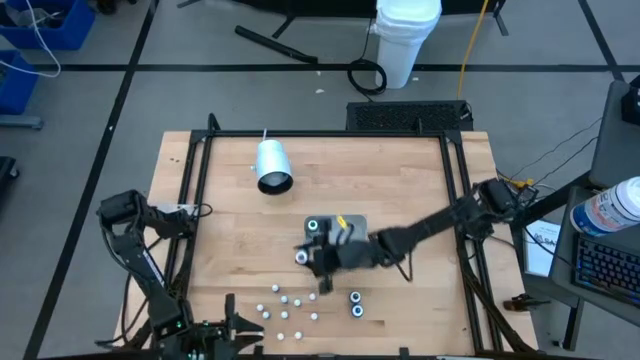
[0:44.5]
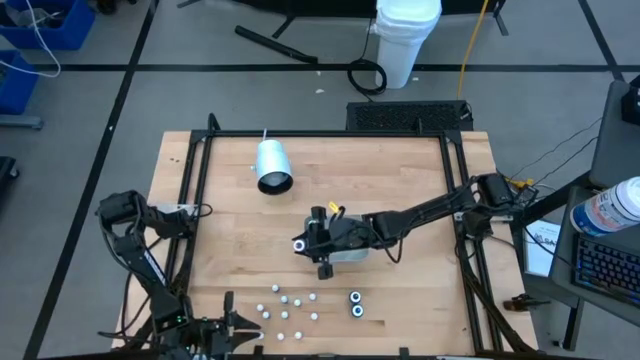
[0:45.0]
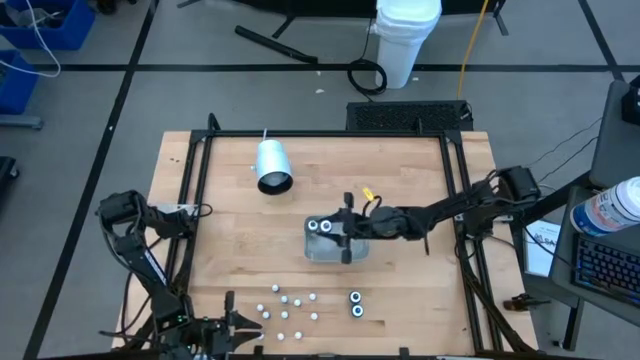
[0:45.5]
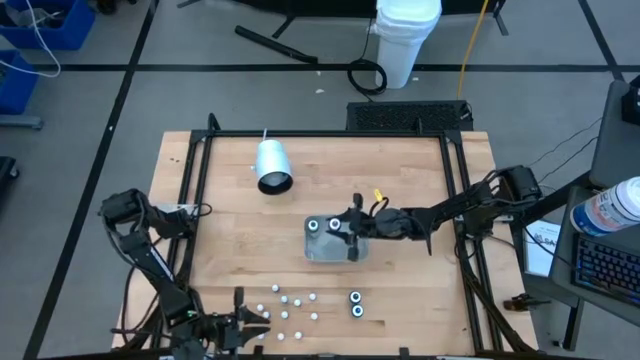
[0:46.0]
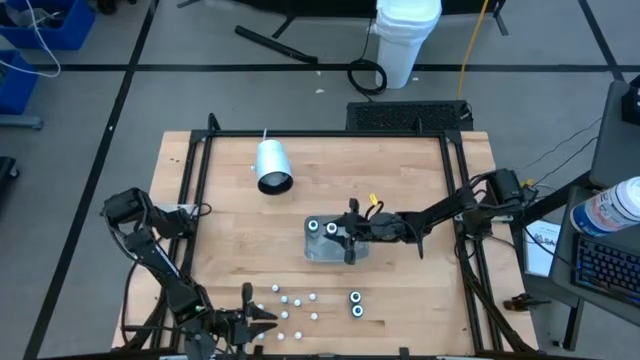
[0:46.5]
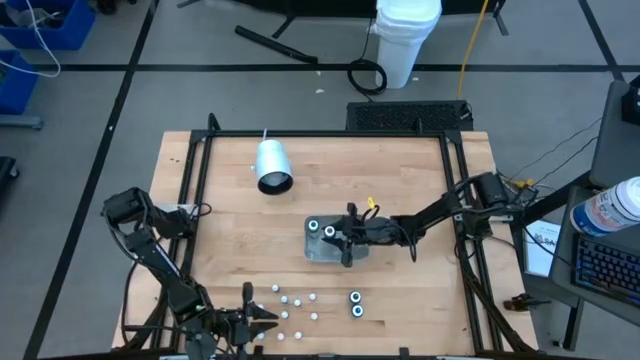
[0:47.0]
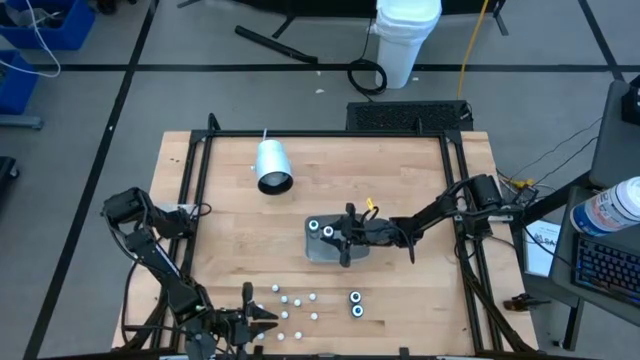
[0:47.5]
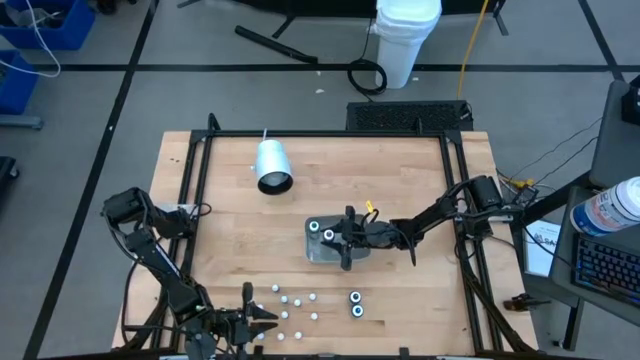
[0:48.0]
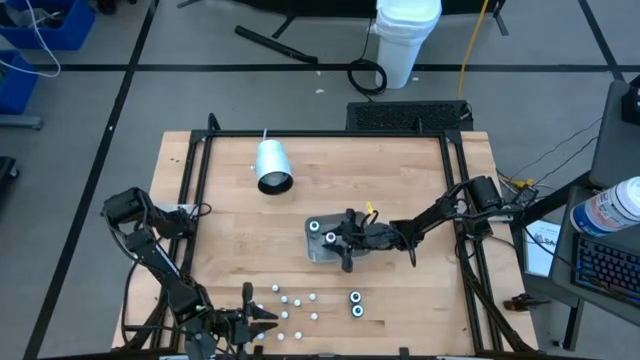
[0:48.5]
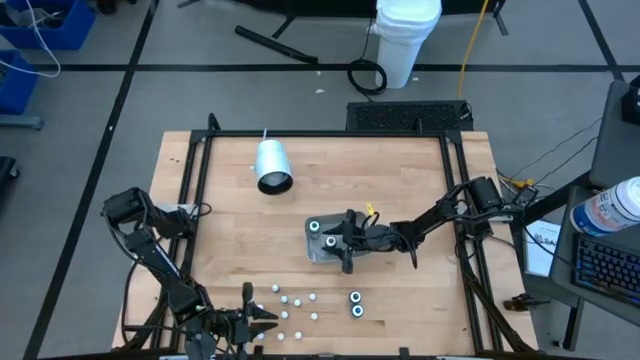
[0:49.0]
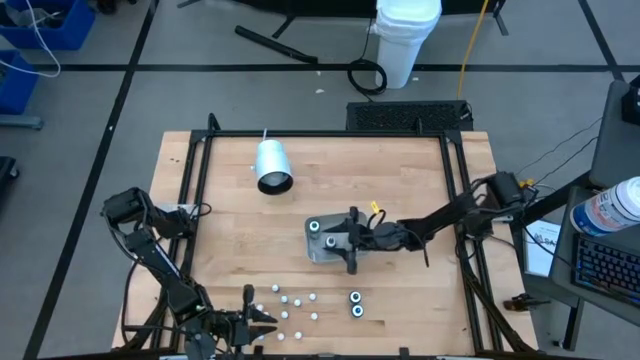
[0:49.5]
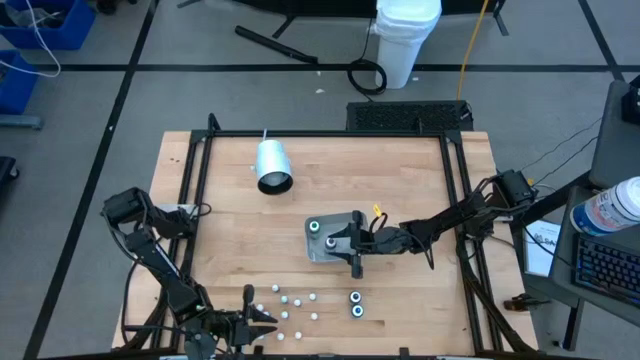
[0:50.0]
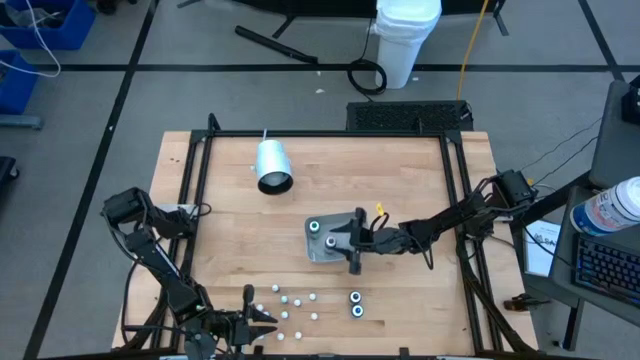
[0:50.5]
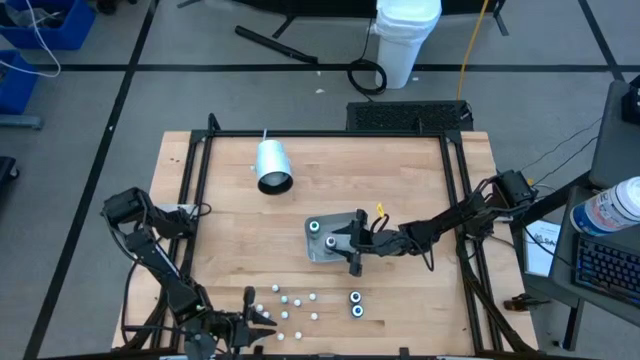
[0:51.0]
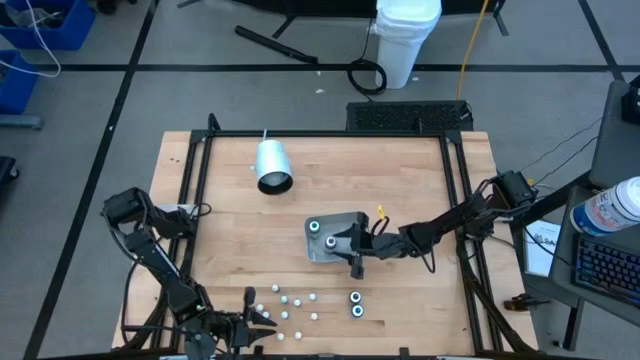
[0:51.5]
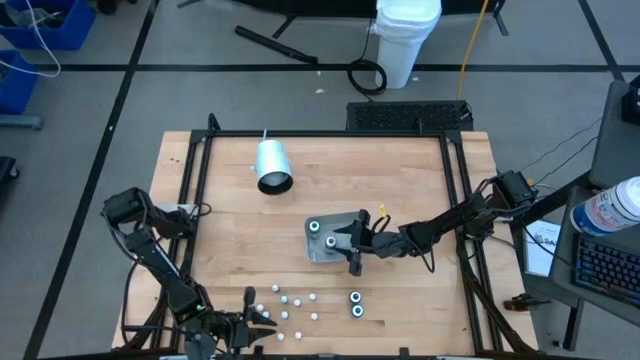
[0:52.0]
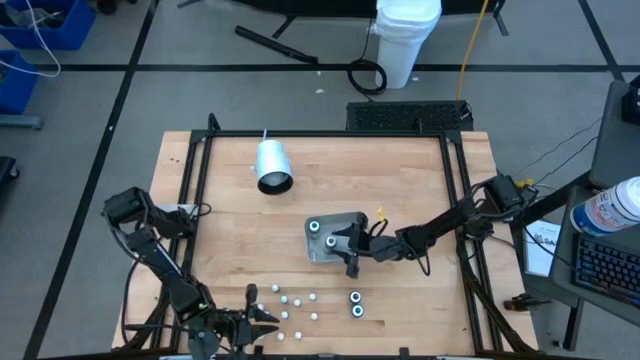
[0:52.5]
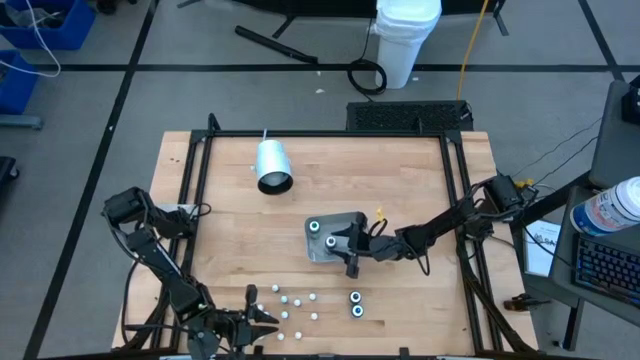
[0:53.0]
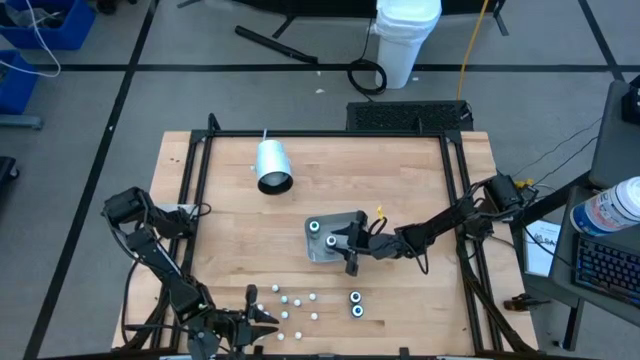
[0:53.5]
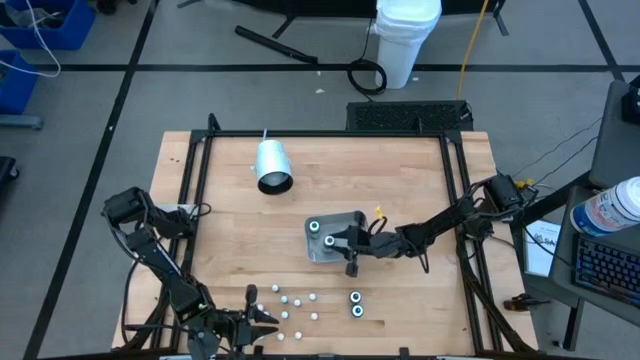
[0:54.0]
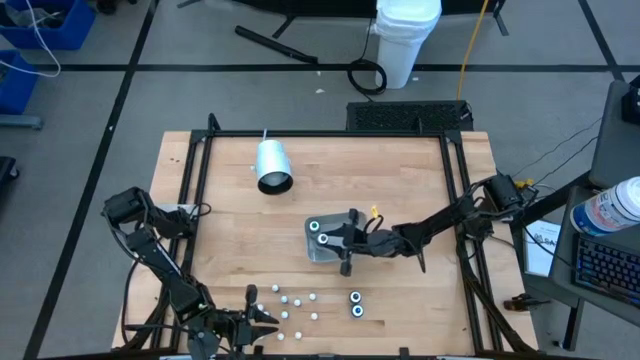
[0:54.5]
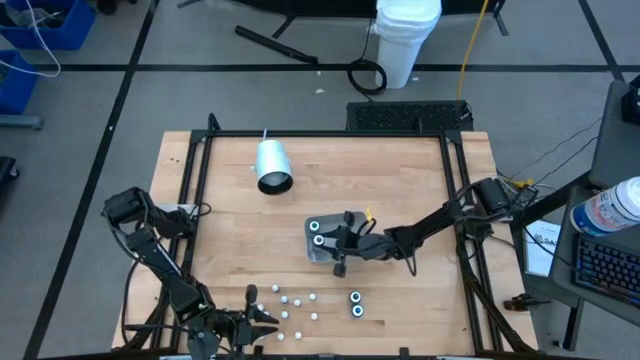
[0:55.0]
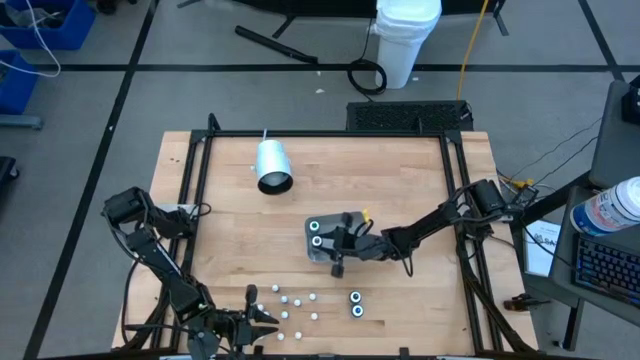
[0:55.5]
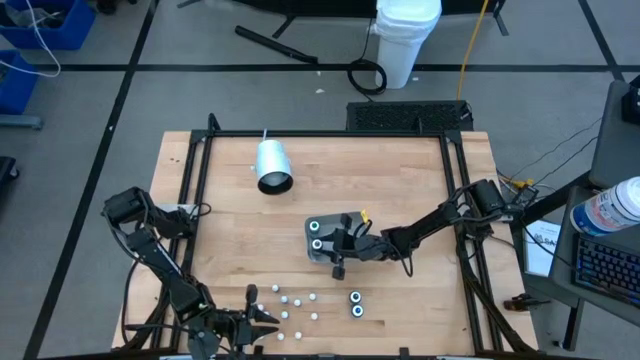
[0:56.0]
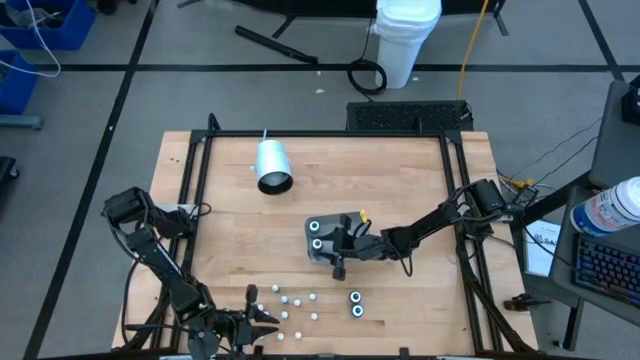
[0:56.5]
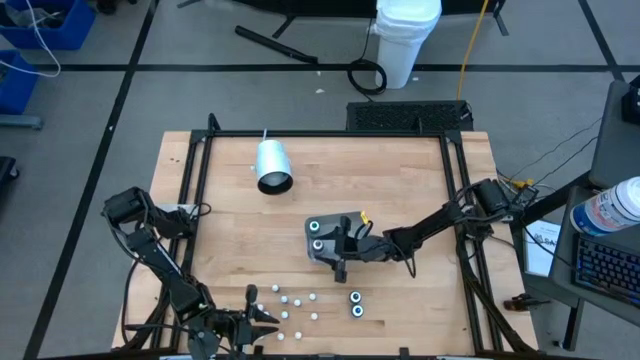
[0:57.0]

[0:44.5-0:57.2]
Task: Pick & Place food coloring
Put the large violet food coloring bottle into the white bin

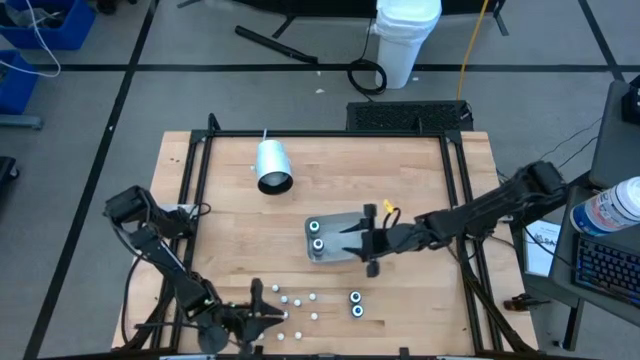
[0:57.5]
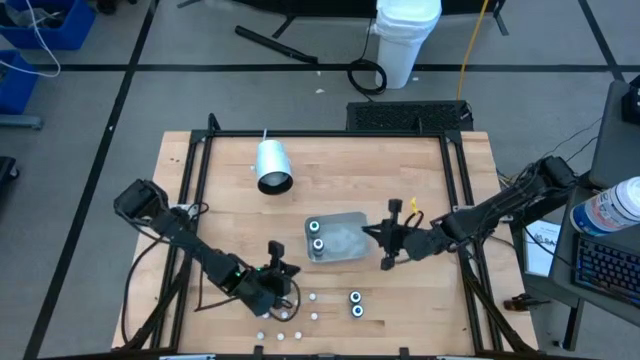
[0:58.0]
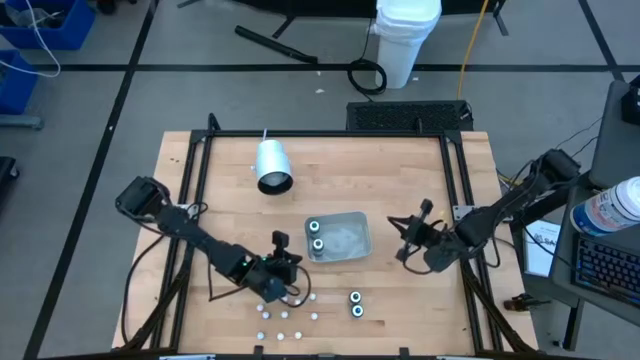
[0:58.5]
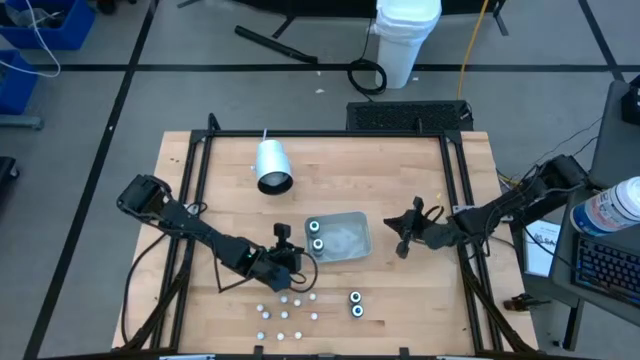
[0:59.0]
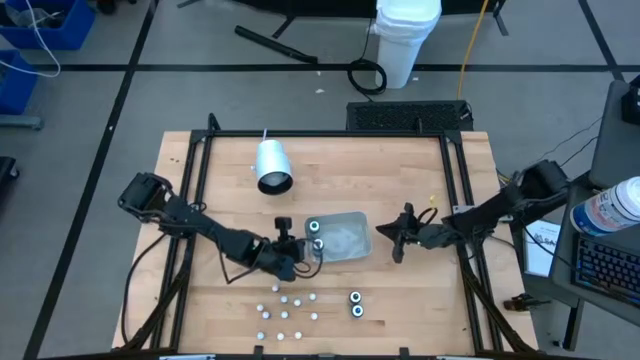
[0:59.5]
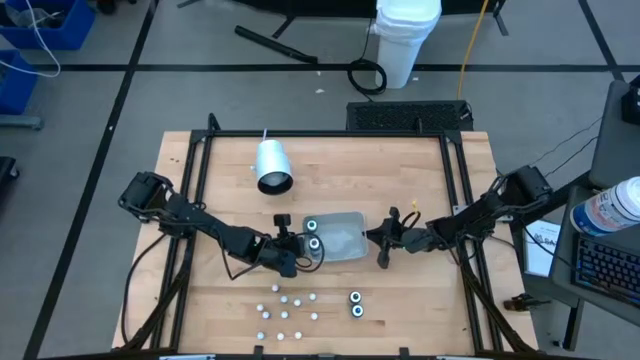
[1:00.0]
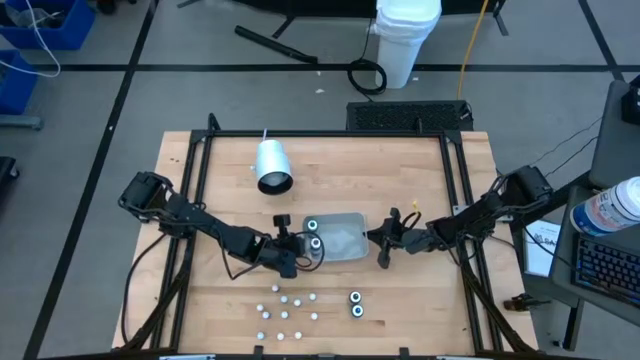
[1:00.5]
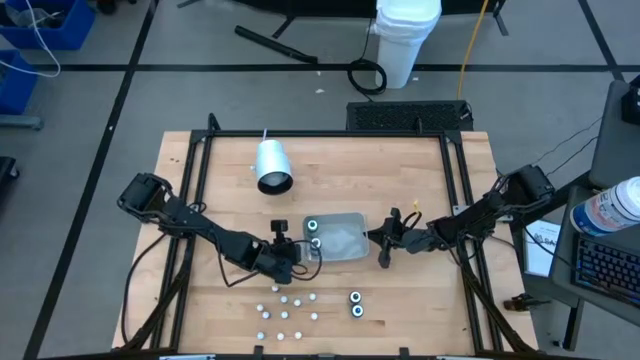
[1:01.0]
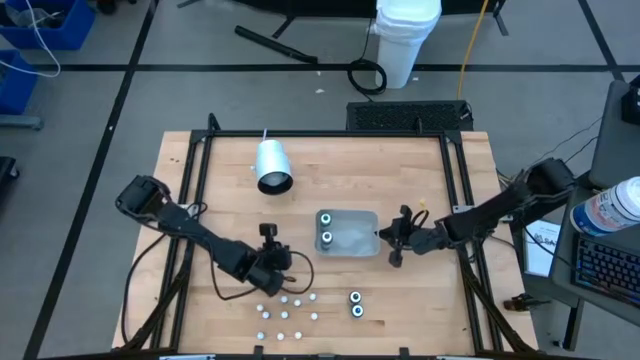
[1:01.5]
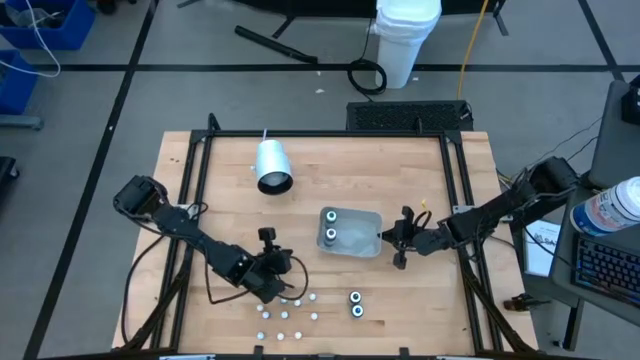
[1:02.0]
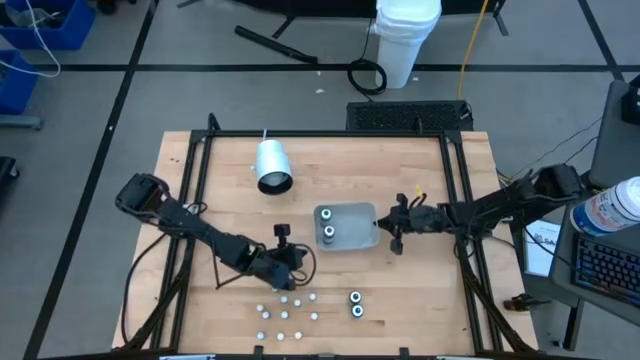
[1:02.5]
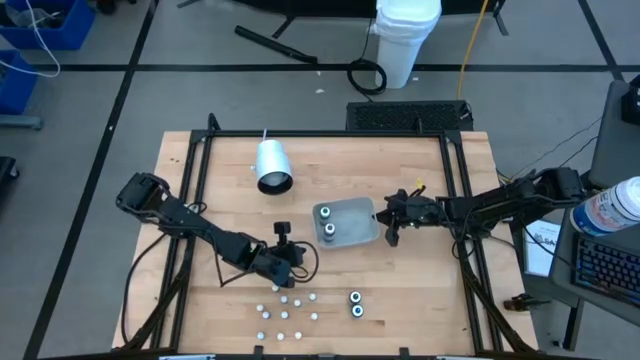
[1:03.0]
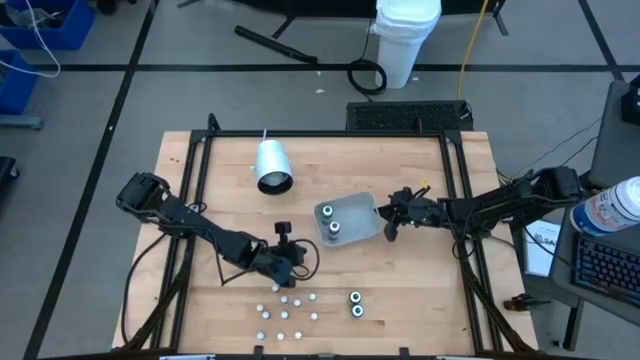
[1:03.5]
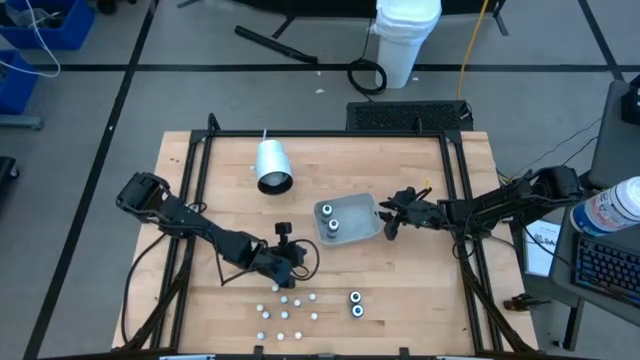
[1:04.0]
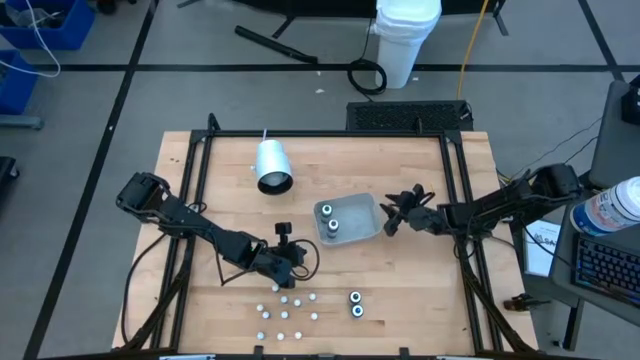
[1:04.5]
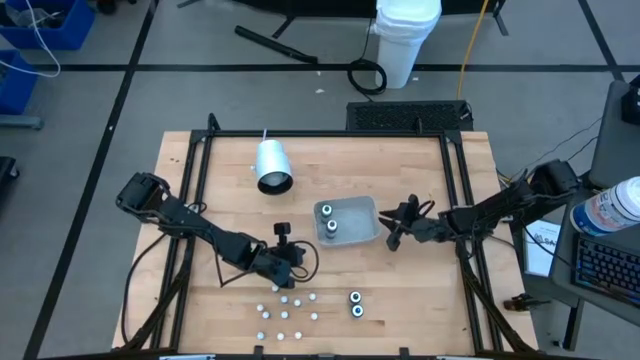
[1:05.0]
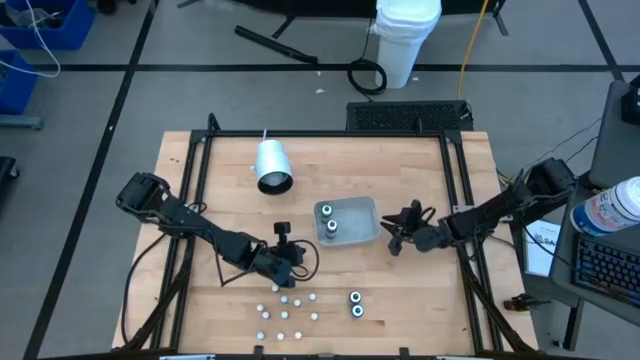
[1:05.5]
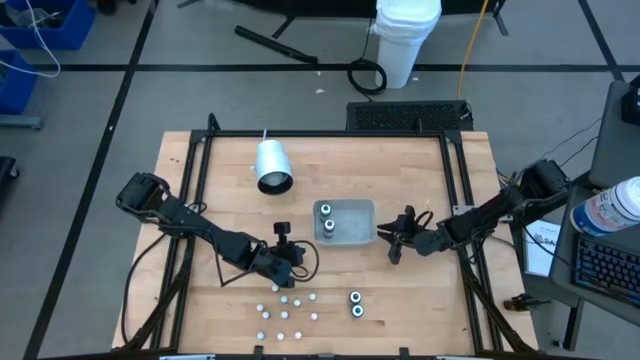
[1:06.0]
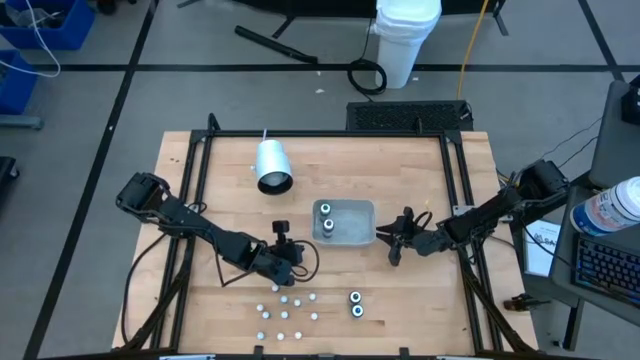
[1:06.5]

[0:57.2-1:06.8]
Adjust the white bin
